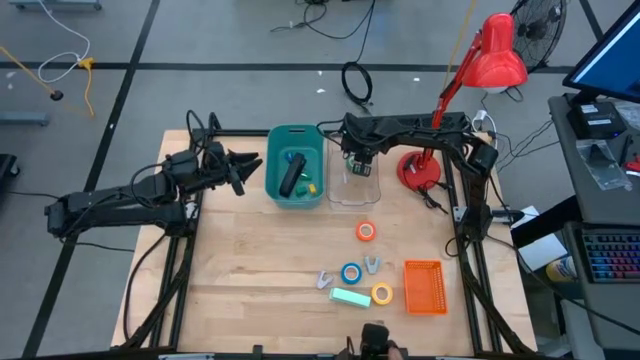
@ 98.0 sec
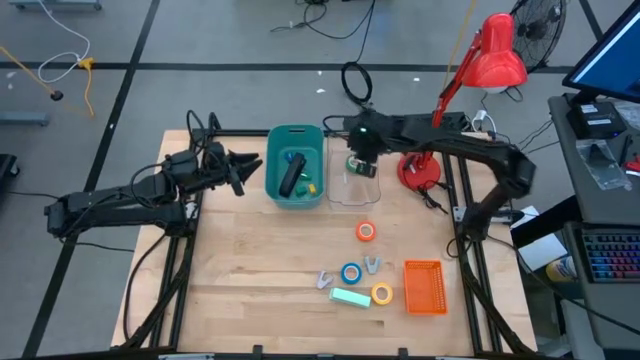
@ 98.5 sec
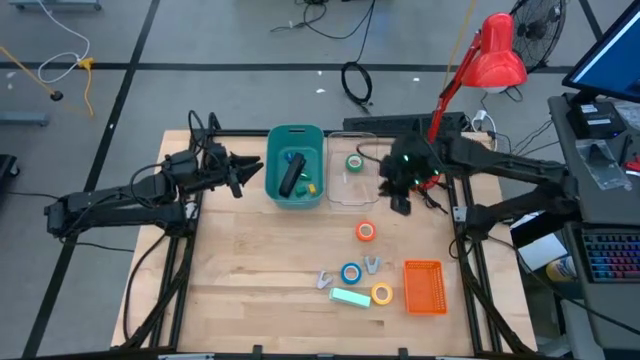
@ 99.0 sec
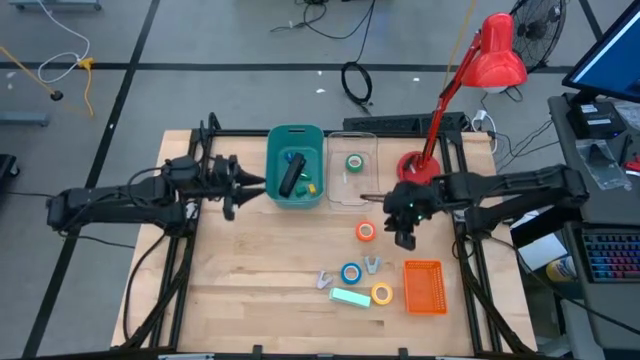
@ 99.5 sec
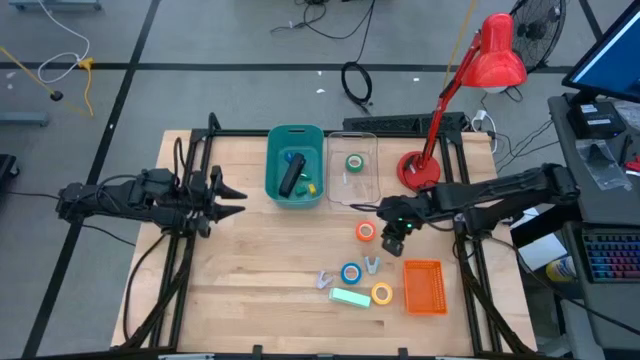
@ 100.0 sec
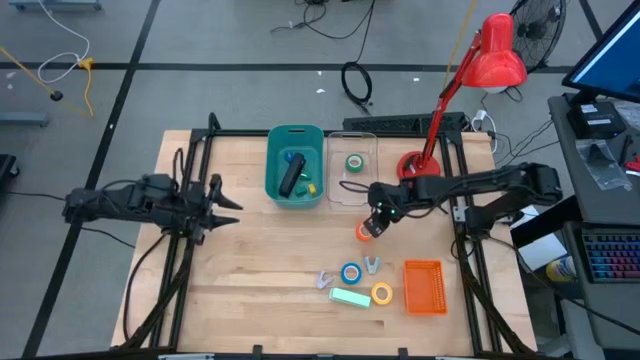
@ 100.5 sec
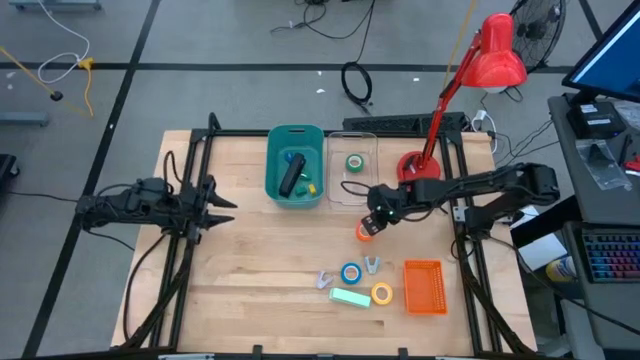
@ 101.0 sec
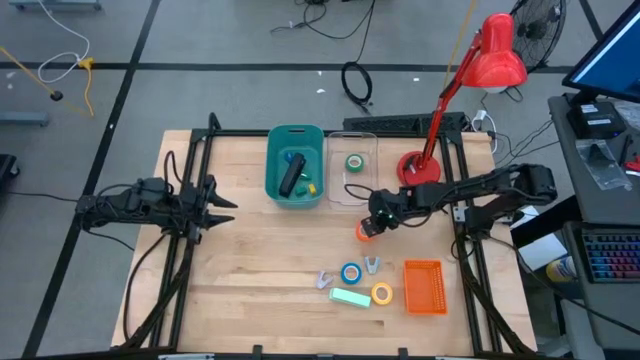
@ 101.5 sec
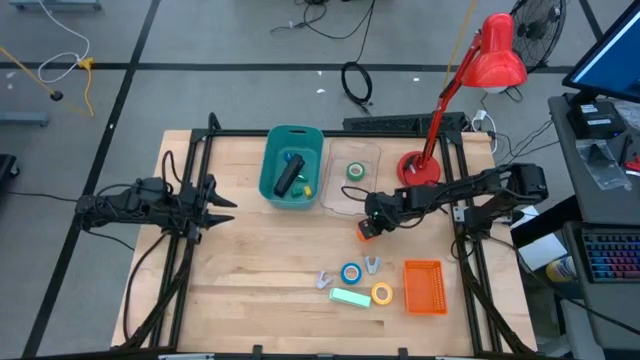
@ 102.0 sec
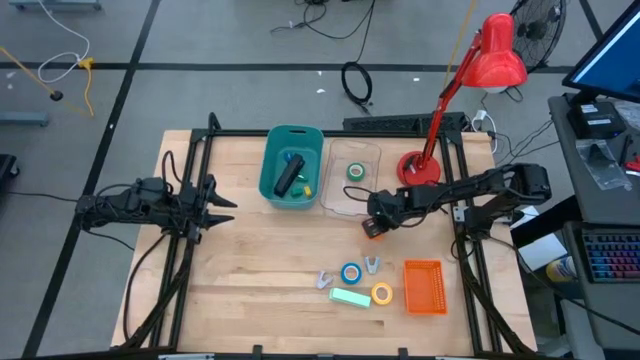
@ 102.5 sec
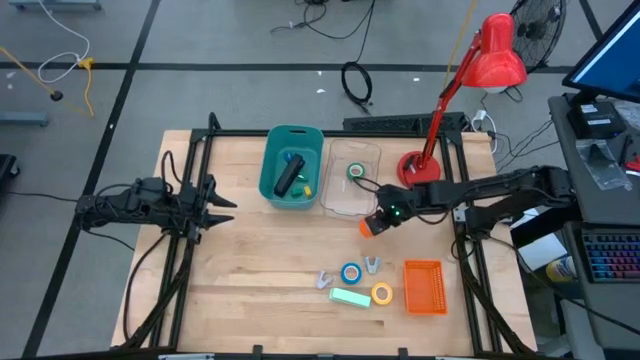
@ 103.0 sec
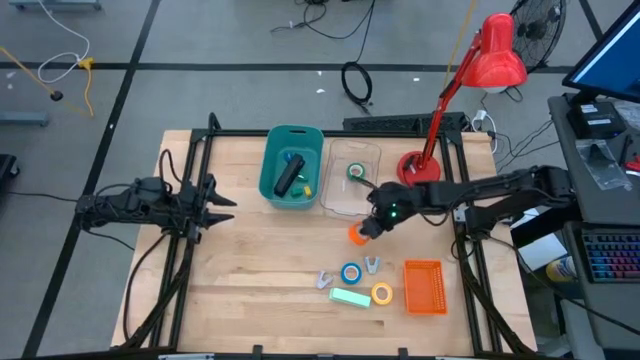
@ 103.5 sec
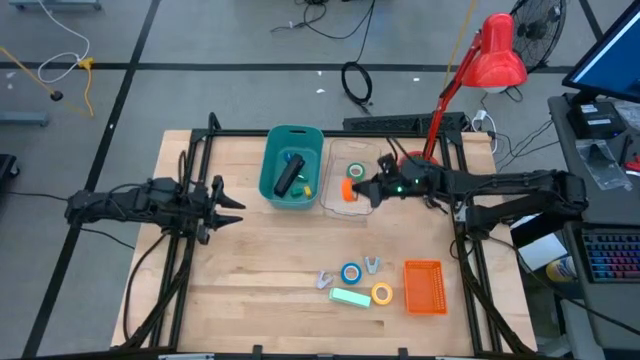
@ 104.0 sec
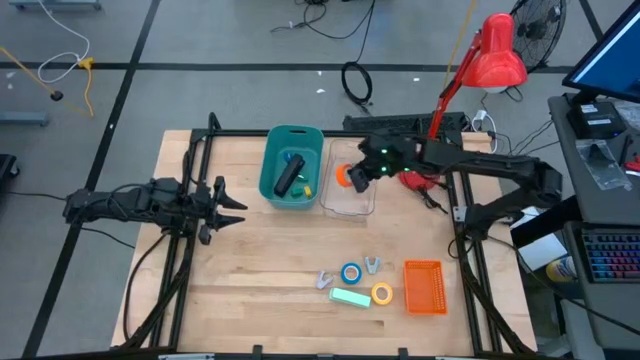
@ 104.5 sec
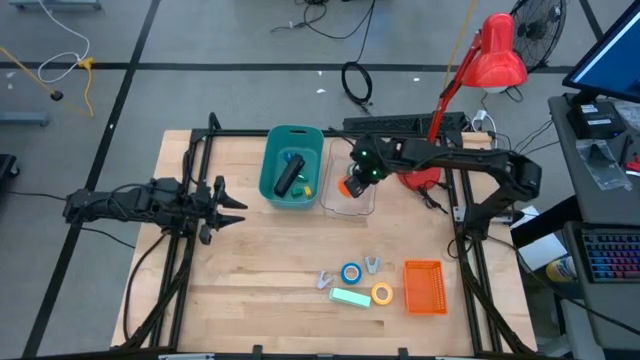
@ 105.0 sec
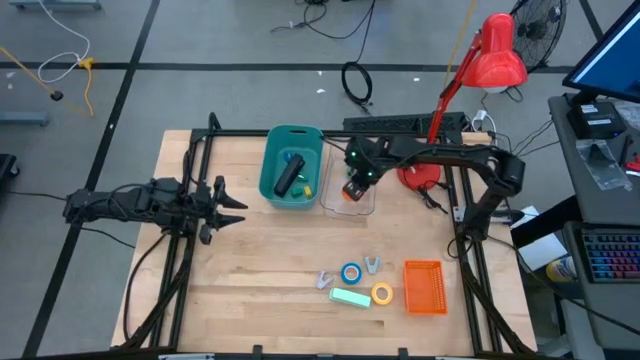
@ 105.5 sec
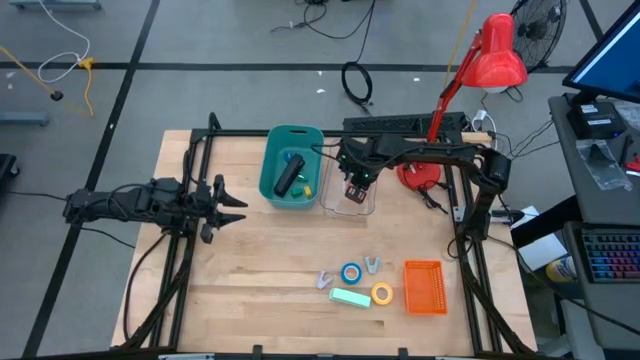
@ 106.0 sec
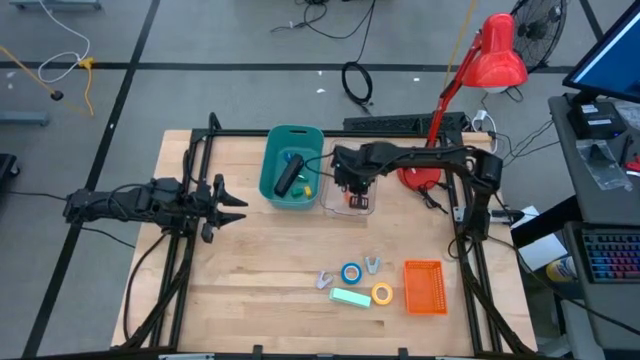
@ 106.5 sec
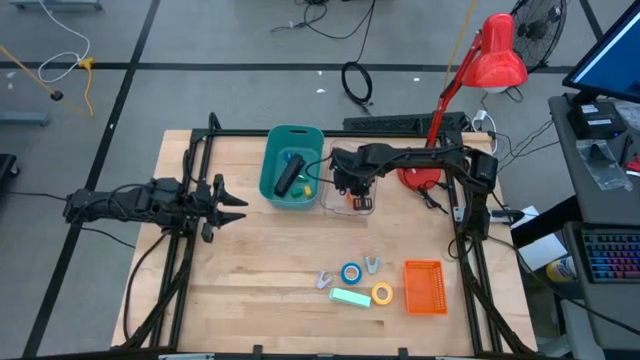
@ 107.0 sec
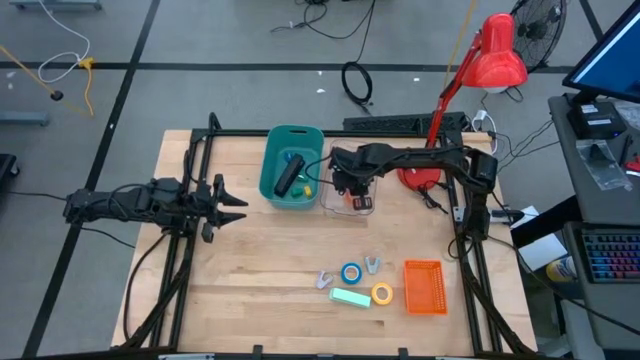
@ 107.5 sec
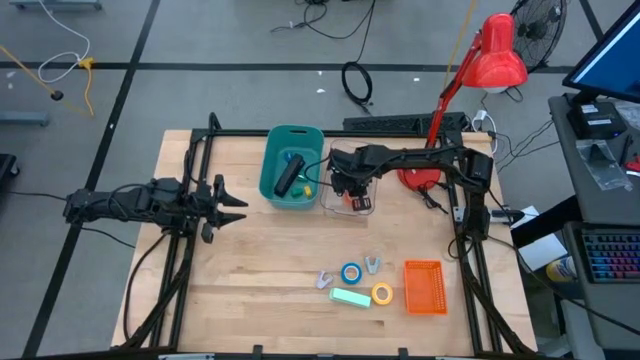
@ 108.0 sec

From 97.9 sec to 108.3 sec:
Task: Pick and place Stapler, Stapler remover, tape
Put the orange tape into the transparent bin

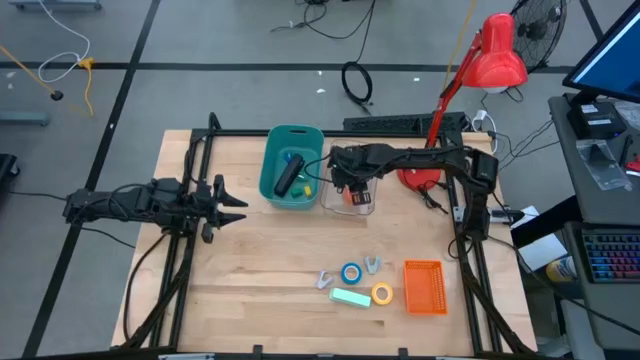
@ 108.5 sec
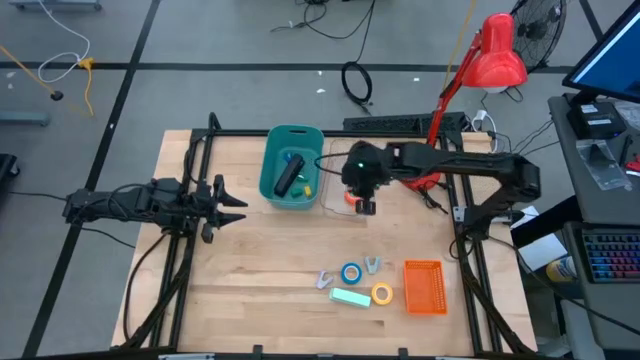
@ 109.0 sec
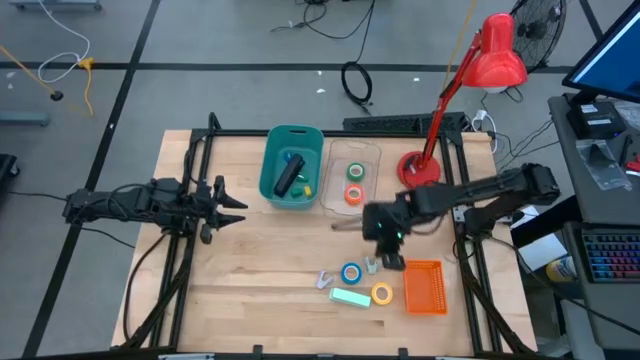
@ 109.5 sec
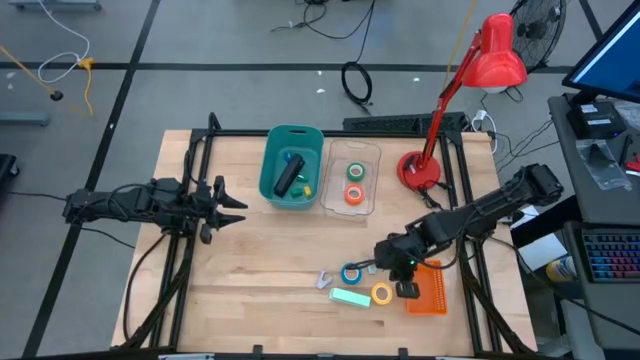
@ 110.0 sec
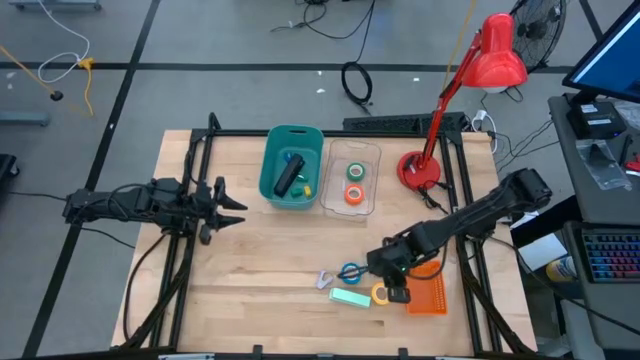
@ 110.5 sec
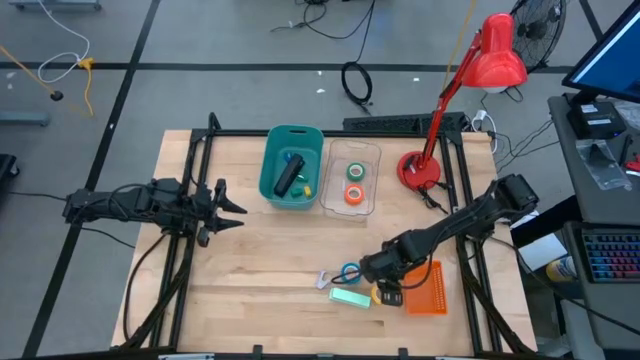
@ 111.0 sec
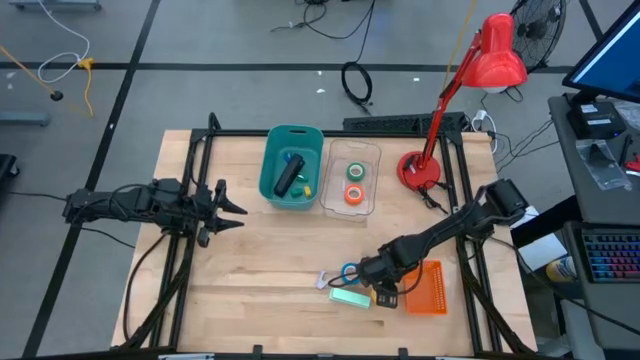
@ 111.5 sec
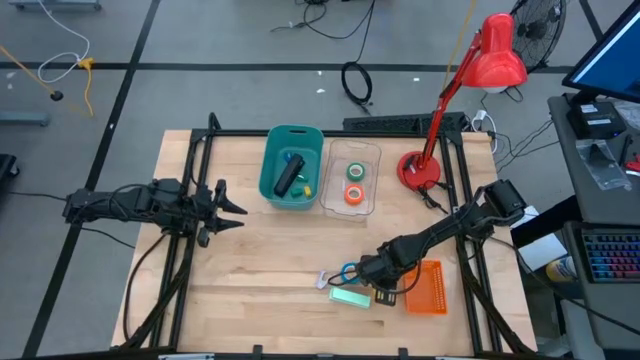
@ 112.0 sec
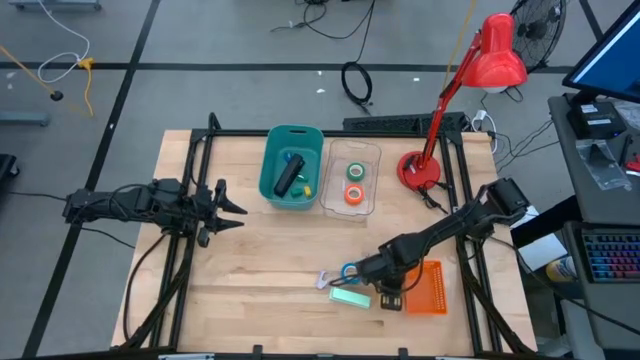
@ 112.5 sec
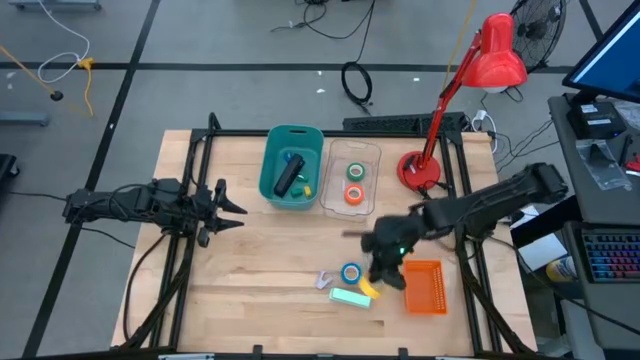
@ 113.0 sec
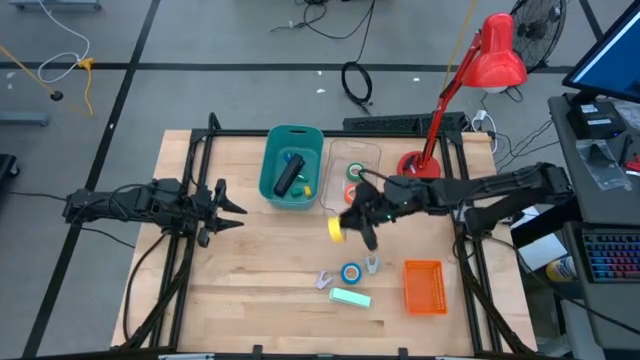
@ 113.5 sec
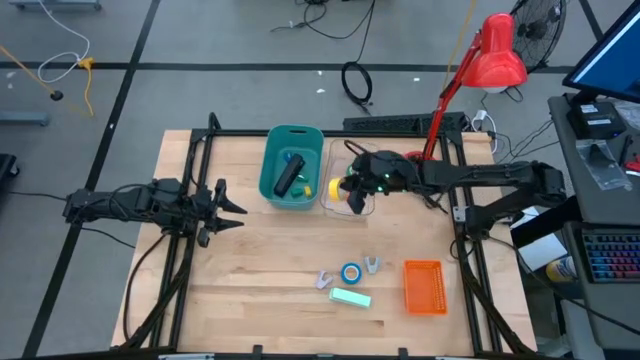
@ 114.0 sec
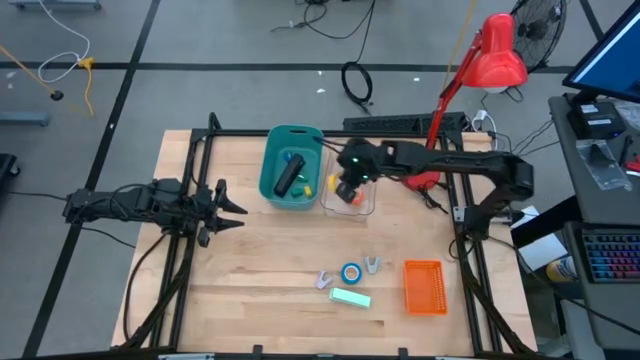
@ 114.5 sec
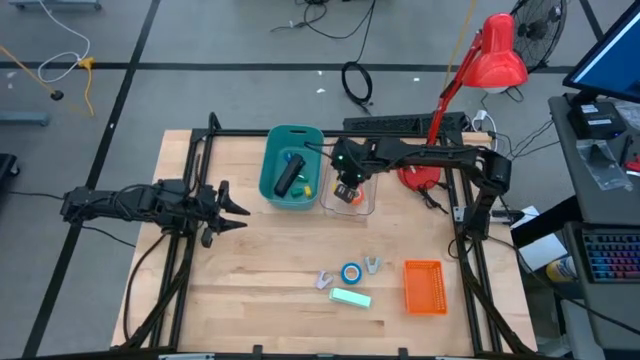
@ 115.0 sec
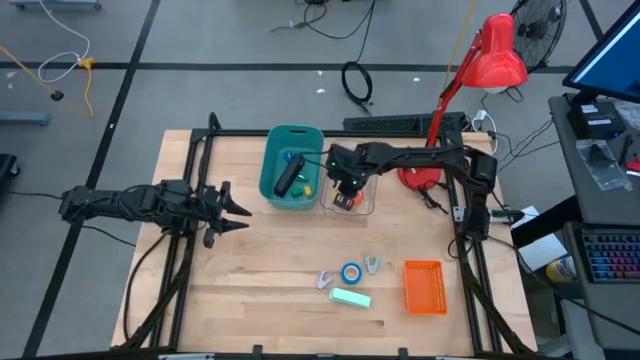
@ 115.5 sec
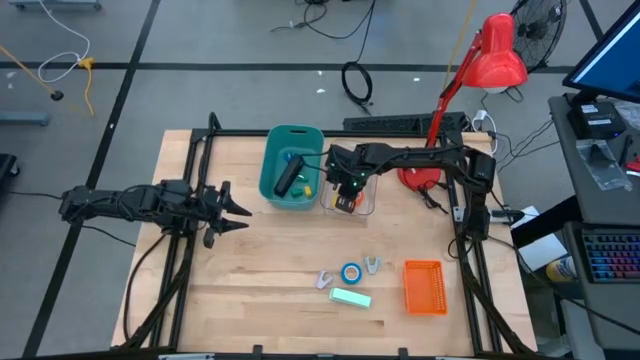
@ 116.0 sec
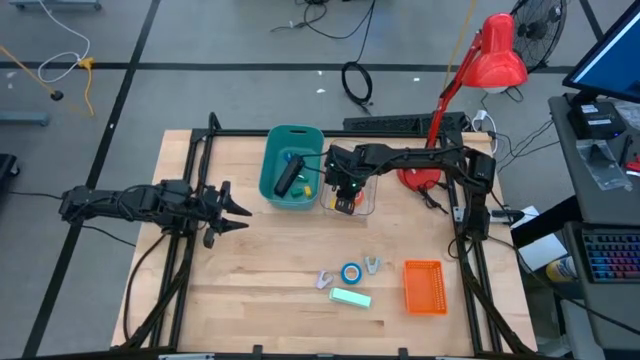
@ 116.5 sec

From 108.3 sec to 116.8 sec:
Put the yellow tape into the transparent bin
